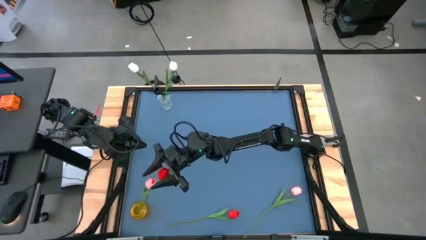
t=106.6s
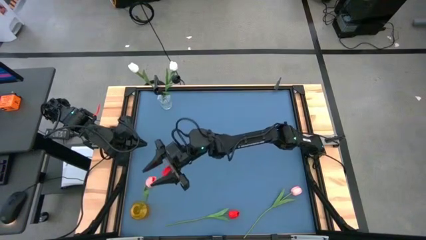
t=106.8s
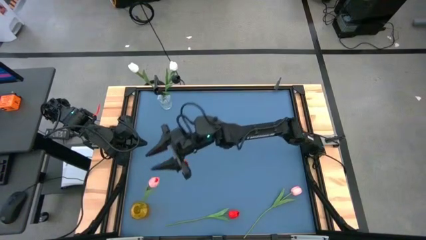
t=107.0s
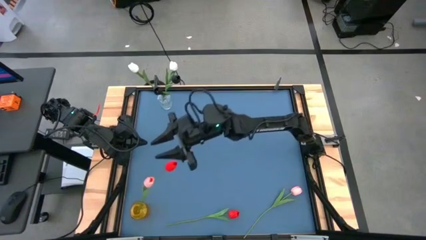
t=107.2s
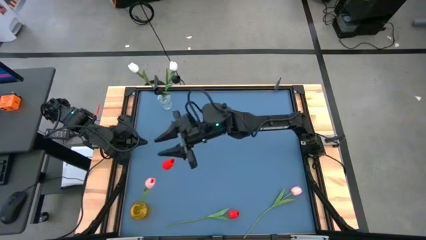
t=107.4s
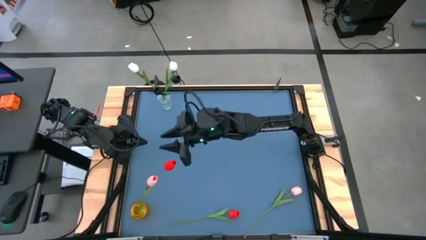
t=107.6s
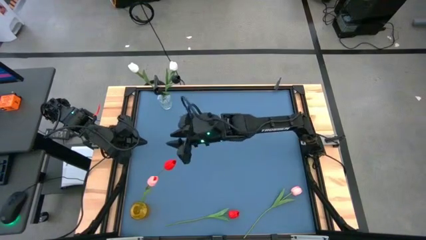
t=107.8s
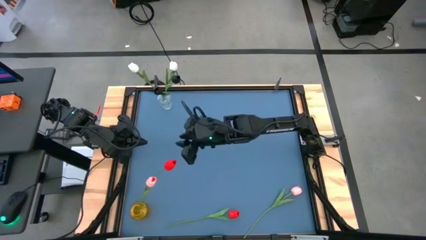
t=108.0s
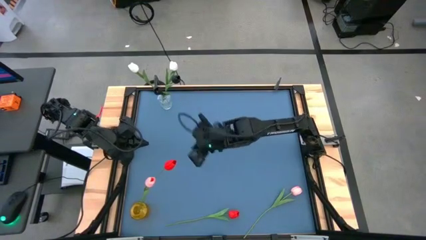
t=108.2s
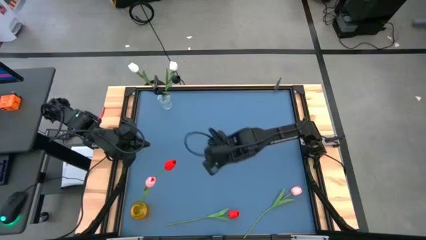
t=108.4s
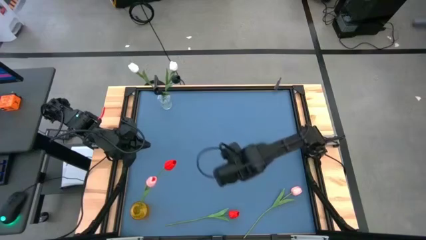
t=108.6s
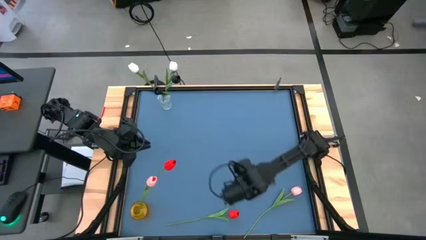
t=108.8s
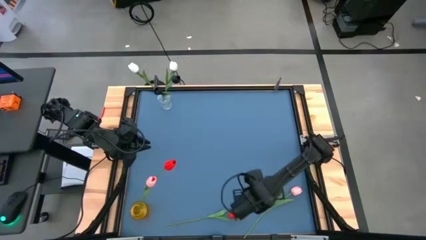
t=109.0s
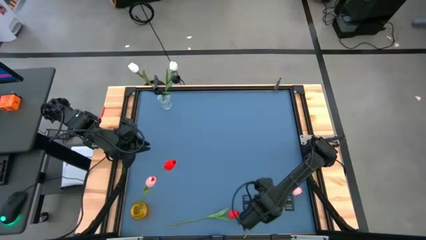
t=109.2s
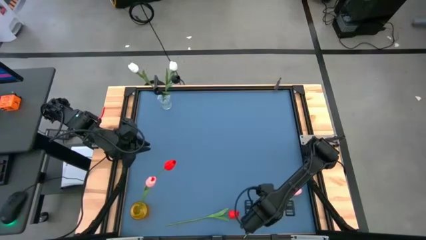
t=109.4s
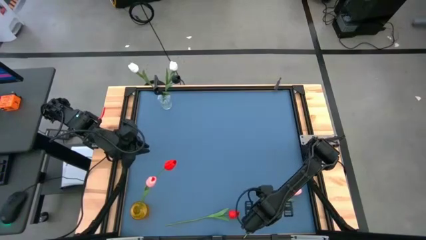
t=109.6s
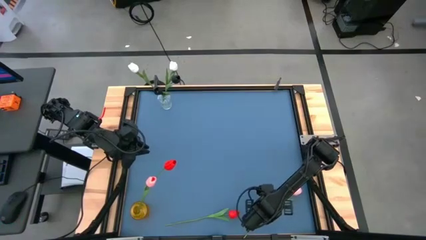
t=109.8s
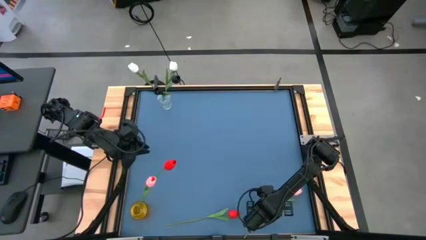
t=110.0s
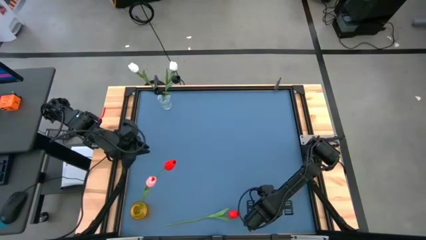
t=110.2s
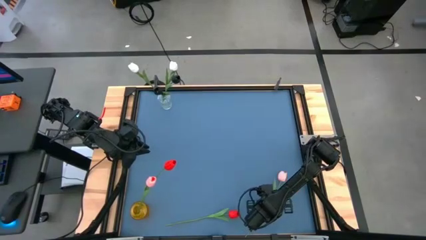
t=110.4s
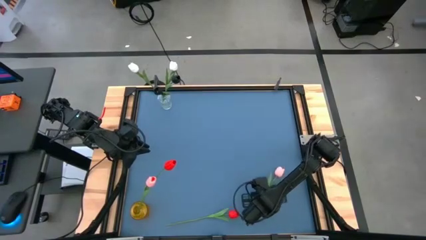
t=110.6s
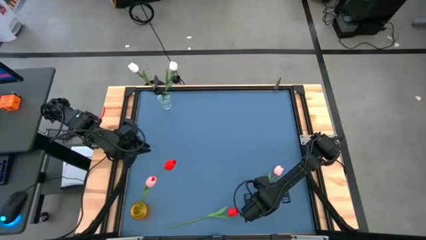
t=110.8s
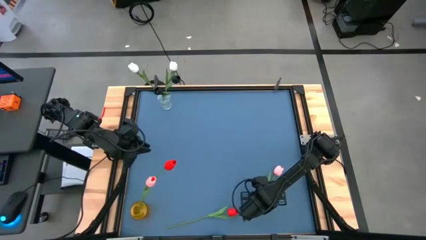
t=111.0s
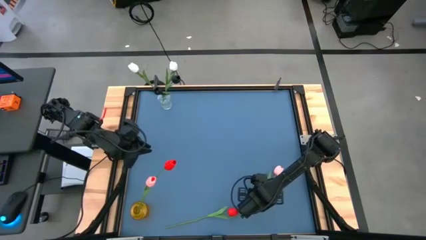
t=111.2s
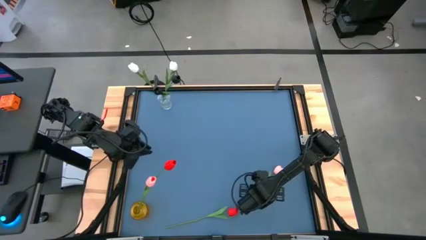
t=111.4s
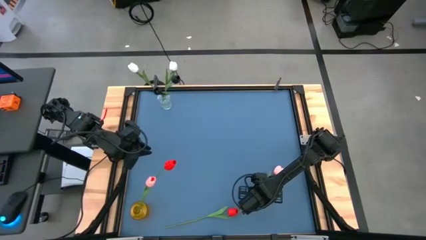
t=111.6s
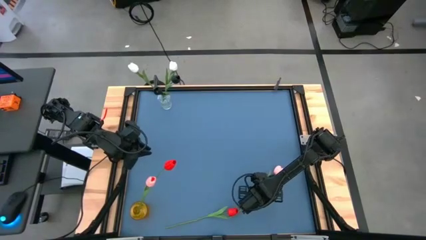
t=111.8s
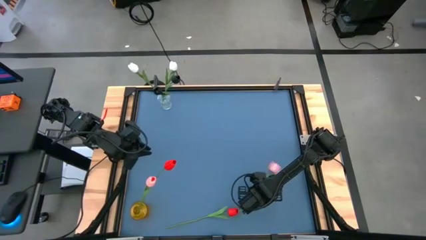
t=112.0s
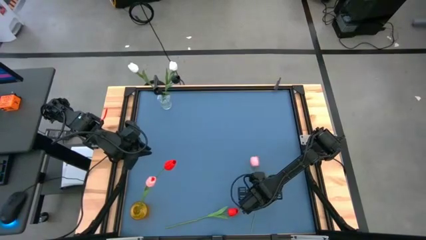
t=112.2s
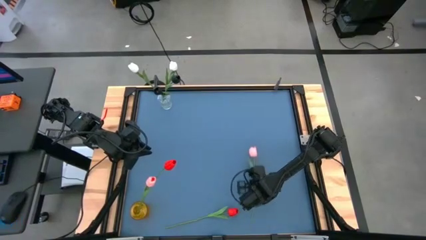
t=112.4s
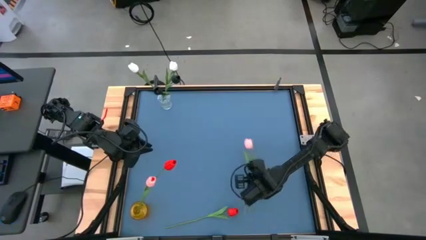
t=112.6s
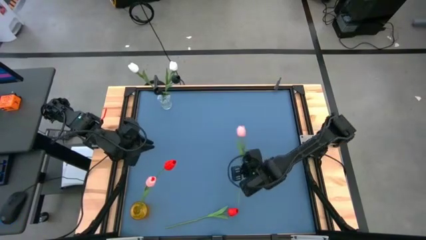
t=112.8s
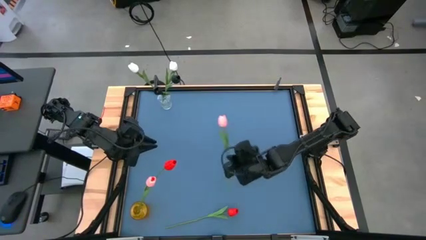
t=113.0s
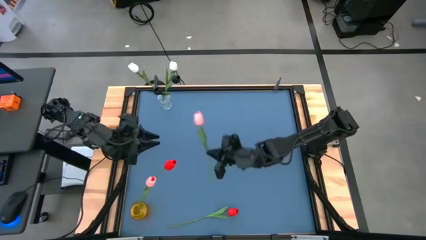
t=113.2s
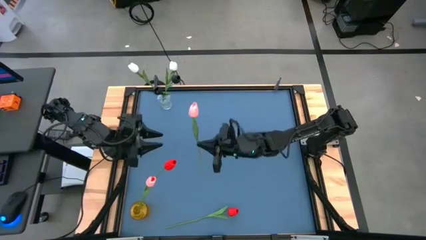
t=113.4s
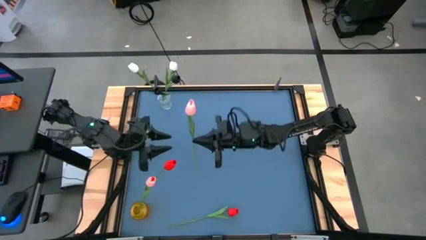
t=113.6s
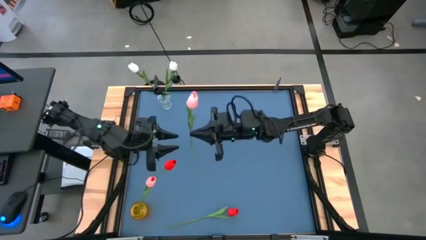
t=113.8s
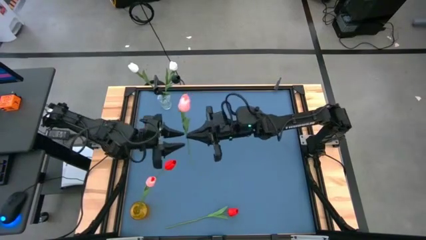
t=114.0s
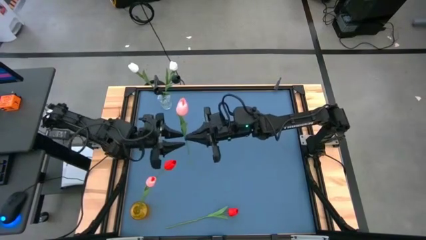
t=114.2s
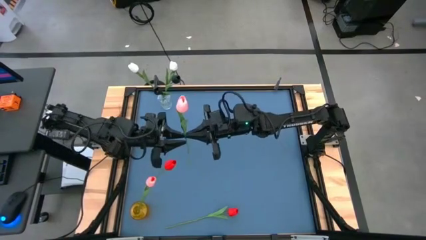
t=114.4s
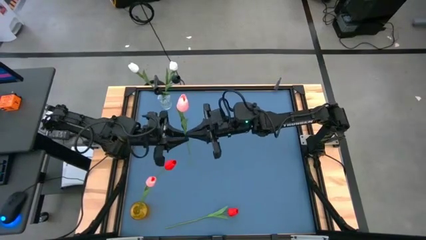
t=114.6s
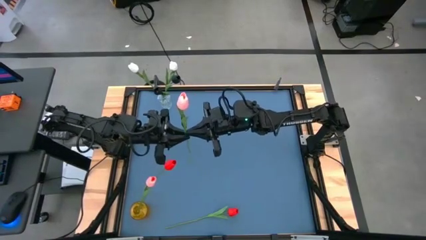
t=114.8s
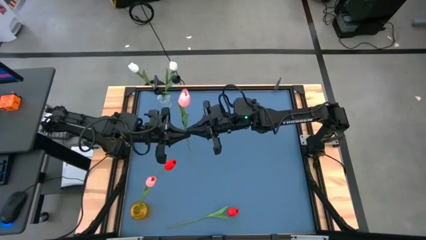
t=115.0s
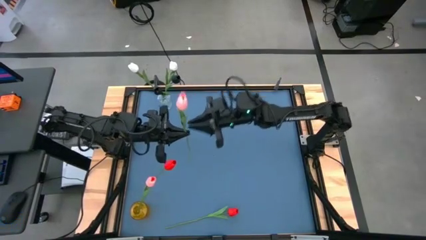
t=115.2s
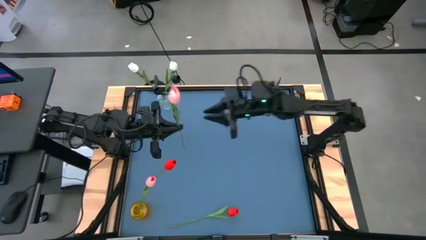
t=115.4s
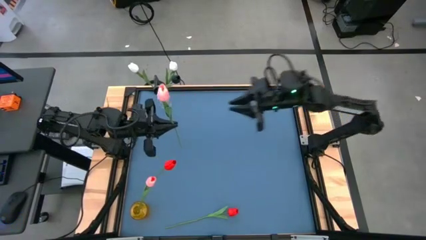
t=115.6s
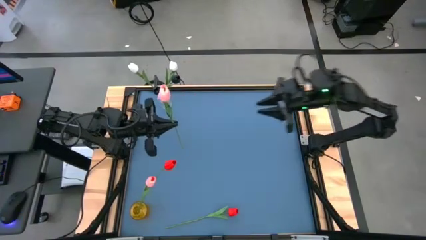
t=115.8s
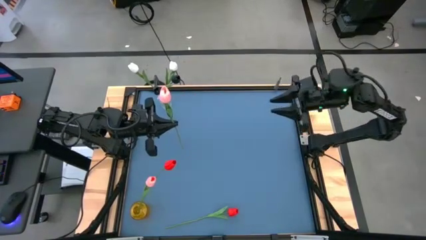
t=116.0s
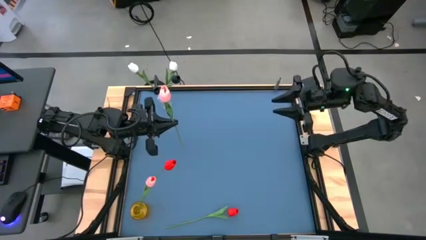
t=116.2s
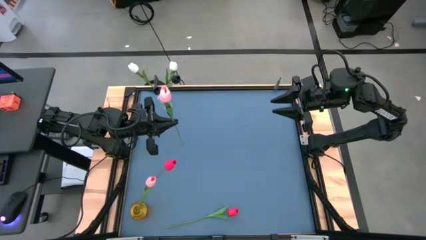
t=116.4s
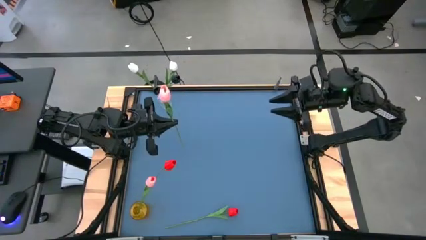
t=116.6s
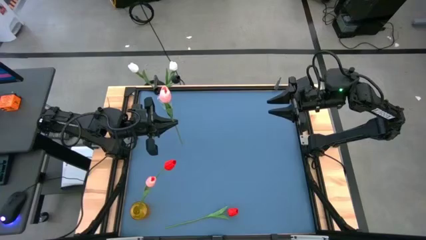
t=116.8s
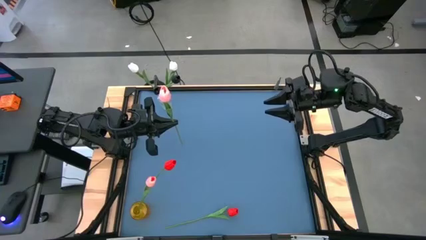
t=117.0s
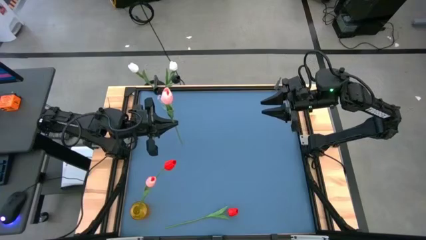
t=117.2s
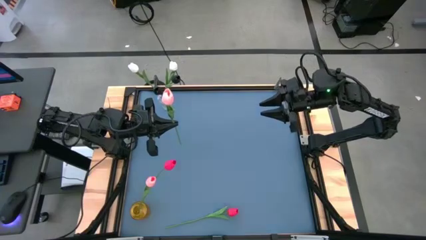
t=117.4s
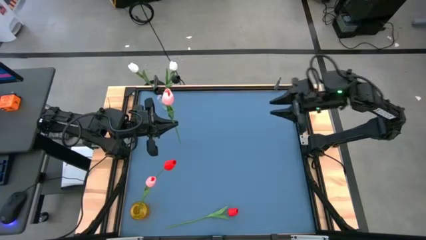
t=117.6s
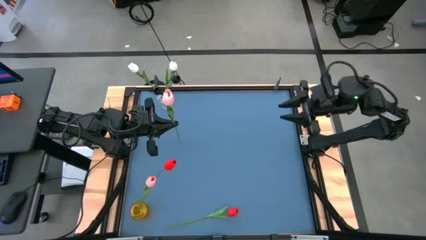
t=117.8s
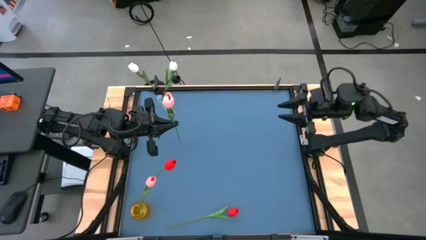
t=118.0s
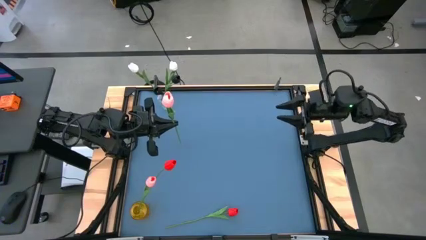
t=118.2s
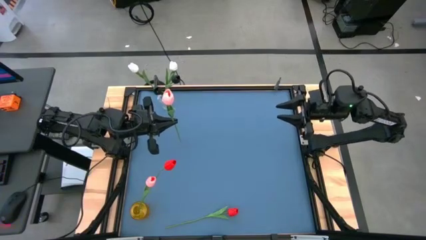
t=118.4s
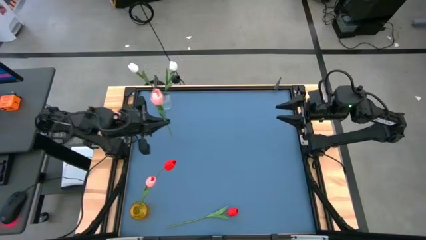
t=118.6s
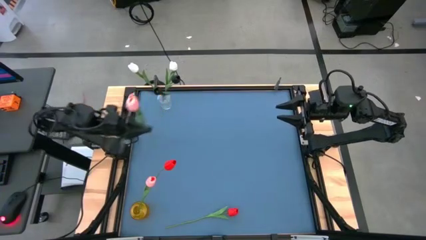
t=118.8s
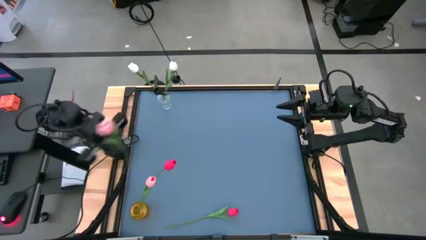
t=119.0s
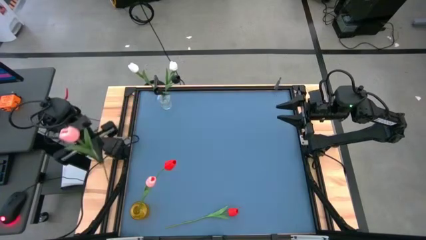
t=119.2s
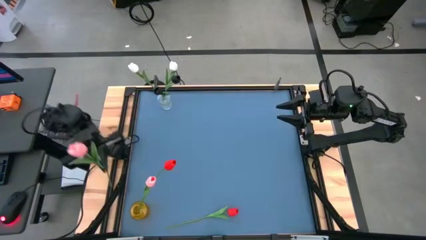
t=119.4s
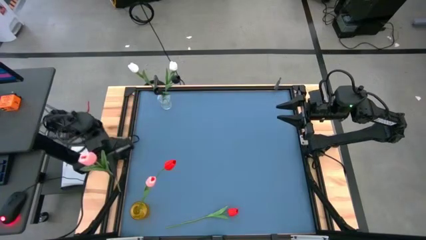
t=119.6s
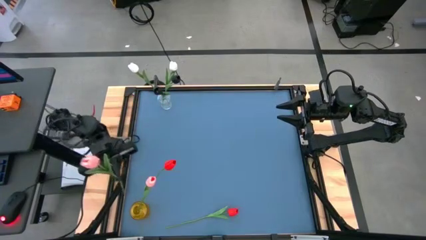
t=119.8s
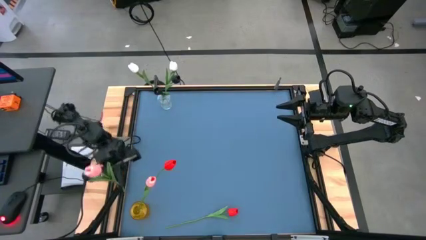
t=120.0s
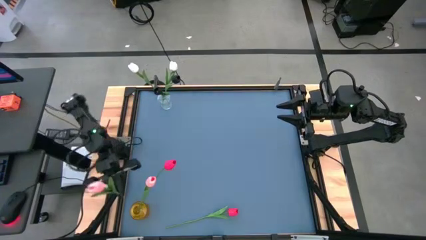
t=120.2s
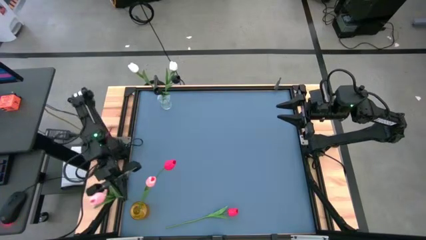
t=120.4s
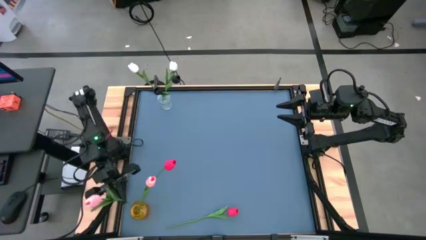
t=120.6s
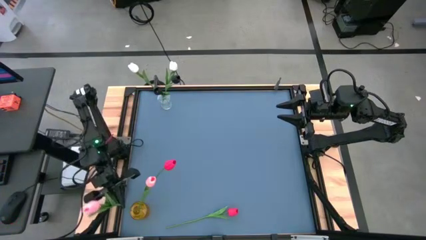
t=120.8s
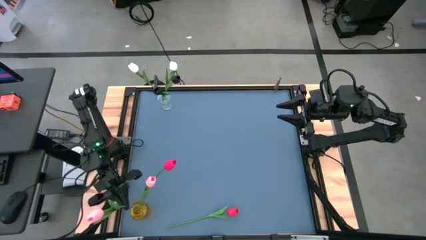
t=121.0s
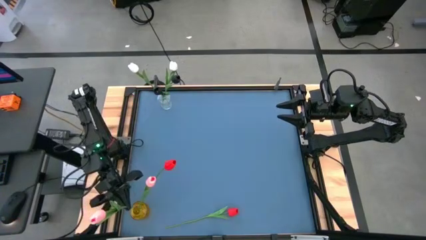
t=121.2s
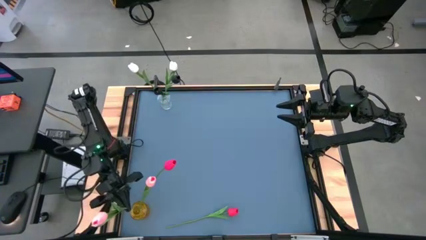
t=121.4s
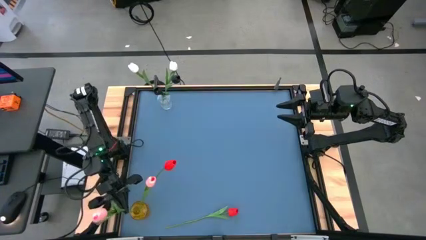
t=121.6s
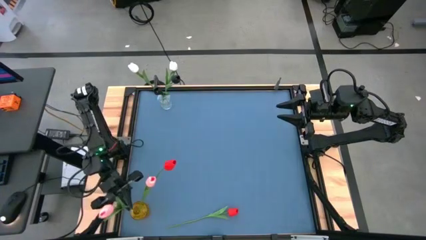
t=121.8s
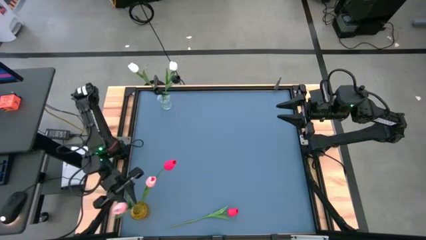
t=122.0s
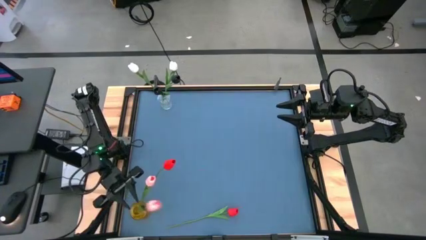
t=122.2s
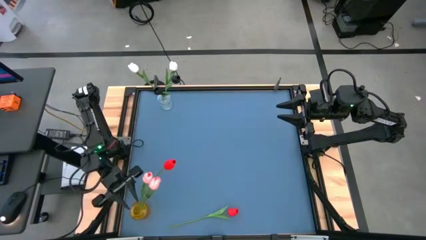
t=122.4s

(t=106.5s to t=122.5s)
Task: Sort flowers into vase by color
Put the pink tulip into the yellow vase

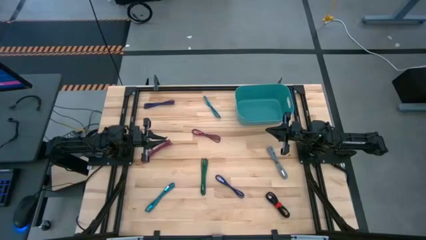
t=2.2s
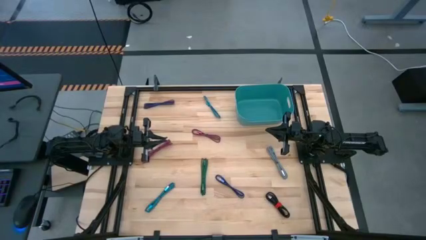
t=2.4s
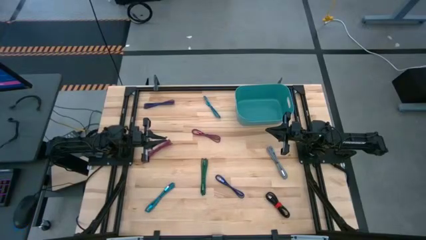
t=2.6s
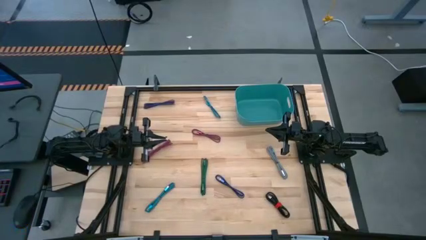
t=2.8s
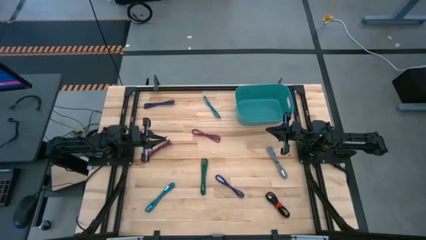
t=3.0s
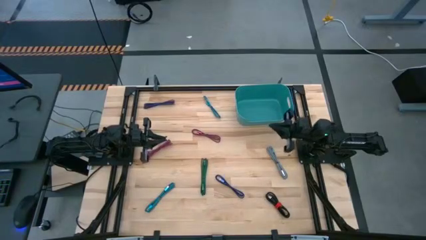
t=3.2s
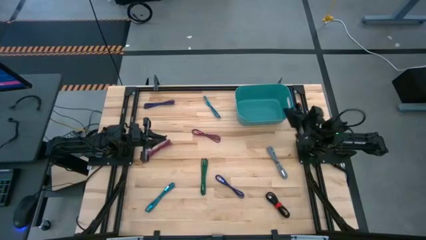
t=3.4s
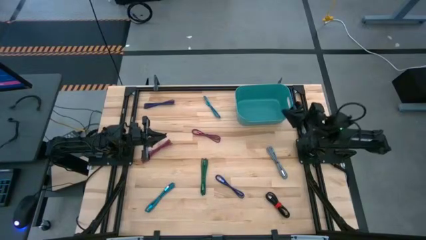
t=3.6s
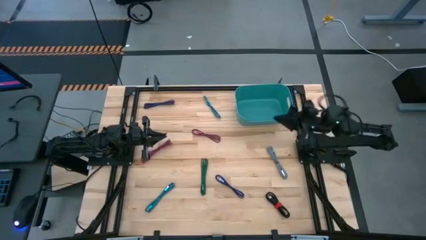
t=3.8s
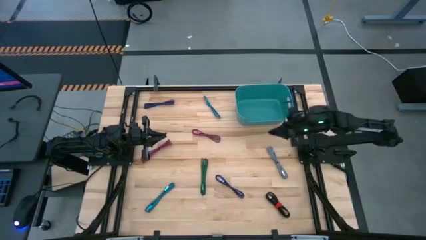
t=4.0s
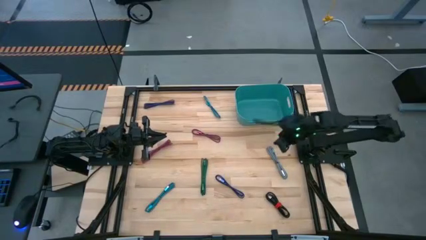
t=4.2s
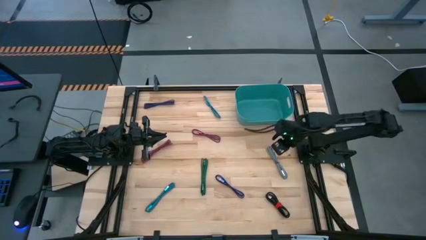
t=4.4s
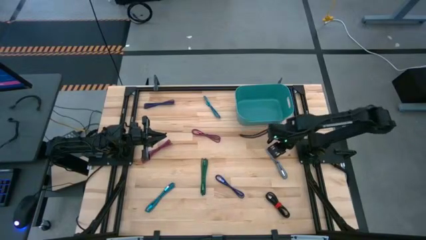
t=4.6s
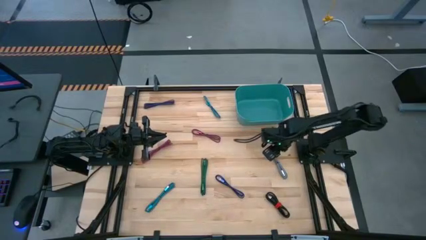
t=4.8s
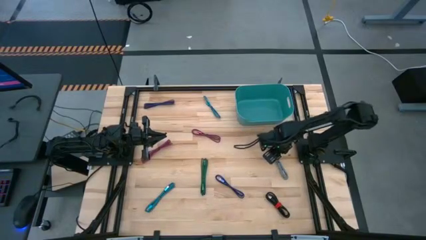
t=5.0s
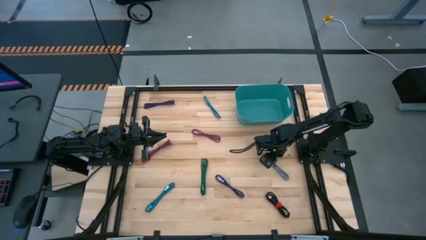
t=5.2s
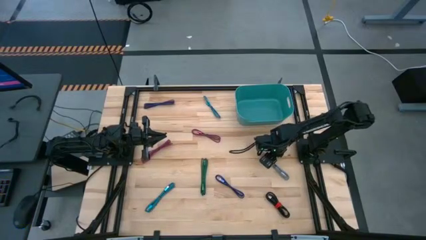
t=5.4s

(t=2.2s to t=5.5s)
Task: Pick and place USB-C Cables
Put the white charger cable into the light blue bin
